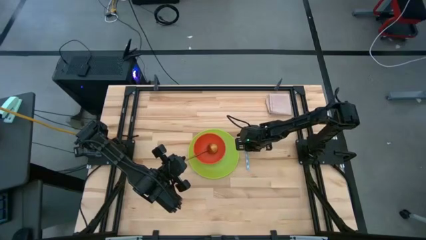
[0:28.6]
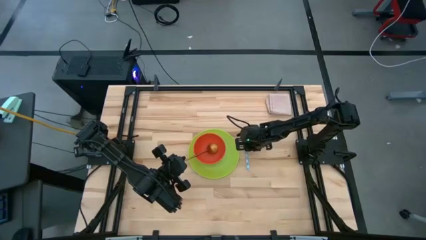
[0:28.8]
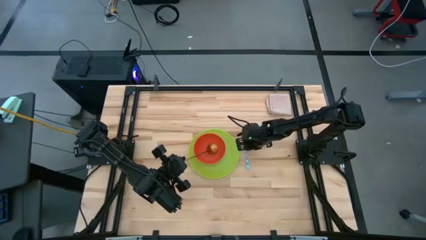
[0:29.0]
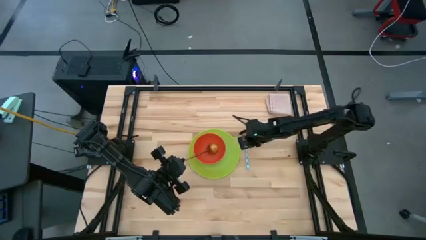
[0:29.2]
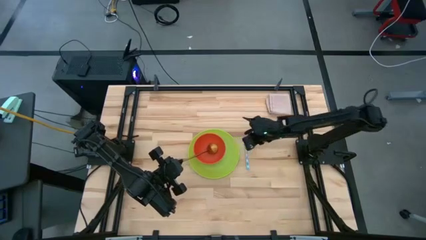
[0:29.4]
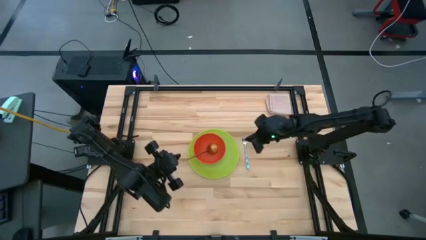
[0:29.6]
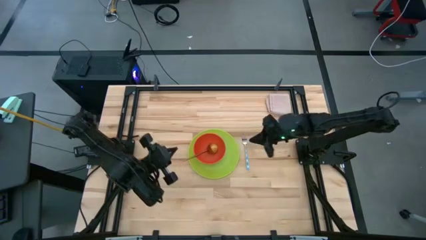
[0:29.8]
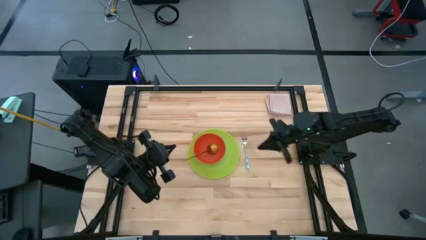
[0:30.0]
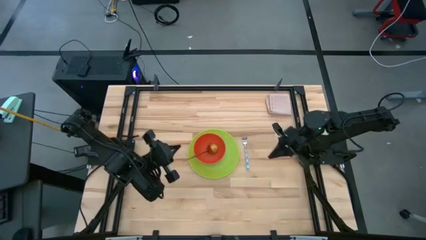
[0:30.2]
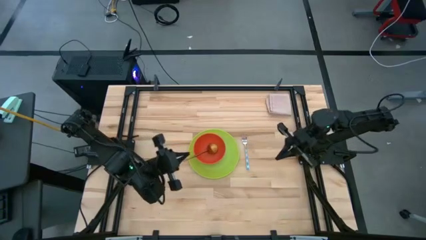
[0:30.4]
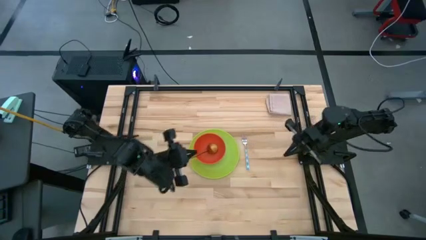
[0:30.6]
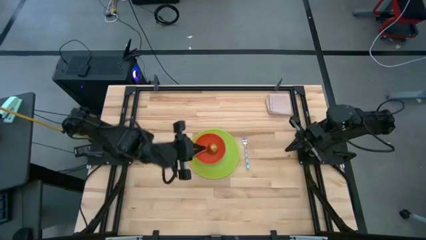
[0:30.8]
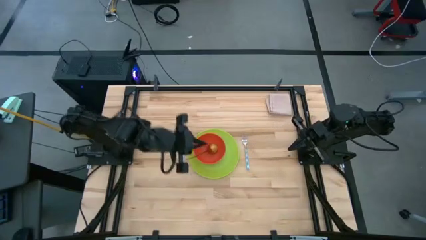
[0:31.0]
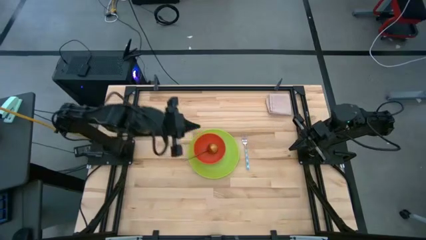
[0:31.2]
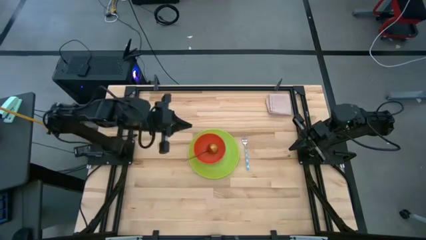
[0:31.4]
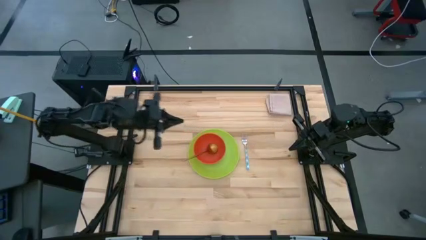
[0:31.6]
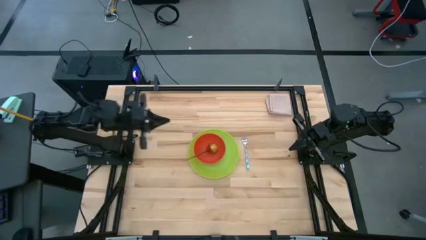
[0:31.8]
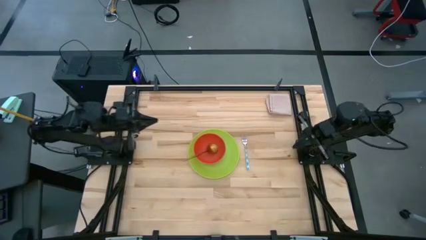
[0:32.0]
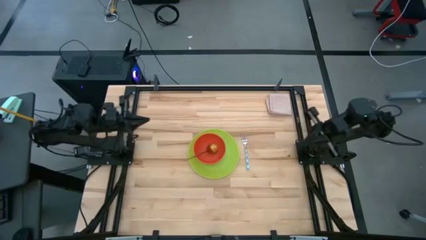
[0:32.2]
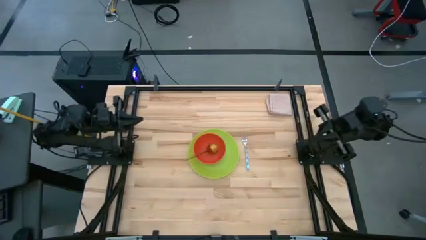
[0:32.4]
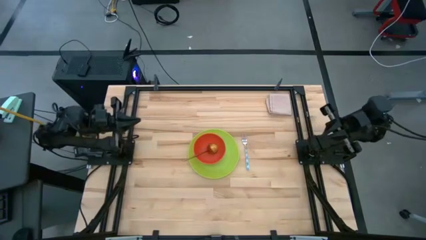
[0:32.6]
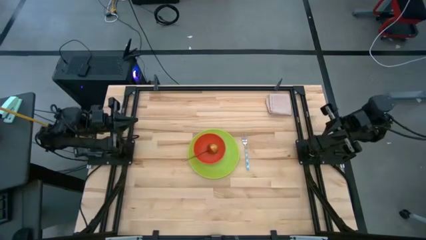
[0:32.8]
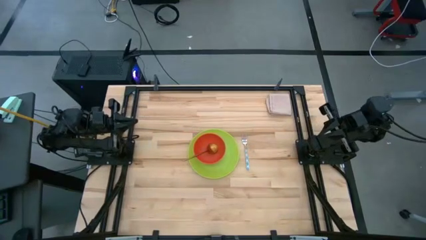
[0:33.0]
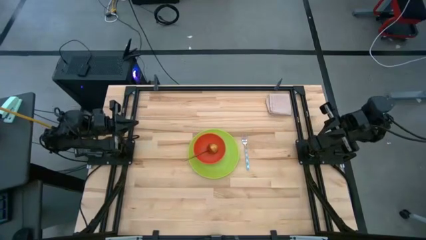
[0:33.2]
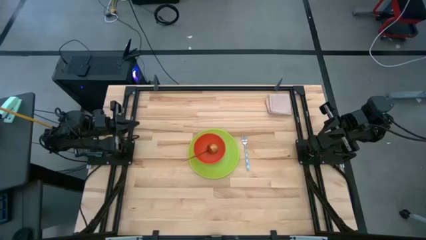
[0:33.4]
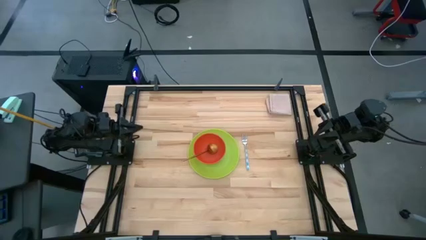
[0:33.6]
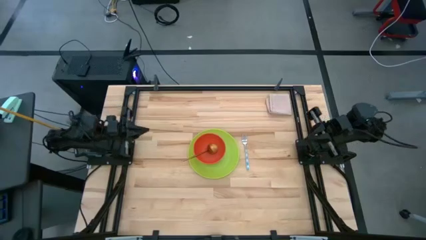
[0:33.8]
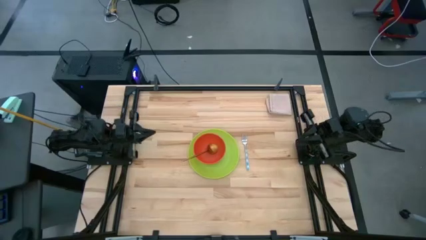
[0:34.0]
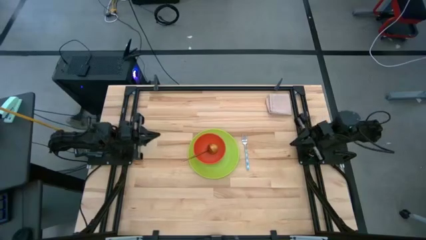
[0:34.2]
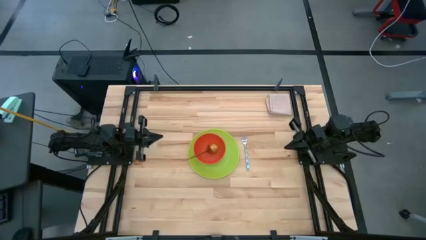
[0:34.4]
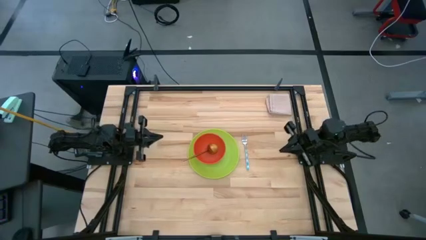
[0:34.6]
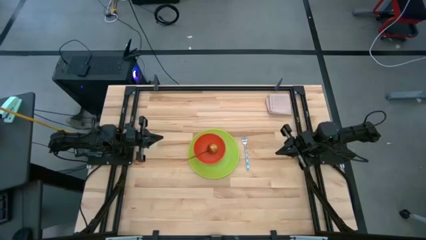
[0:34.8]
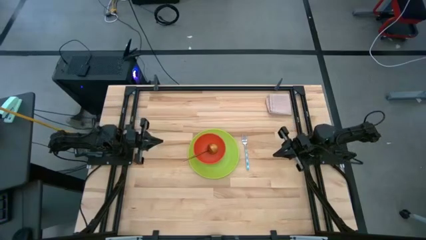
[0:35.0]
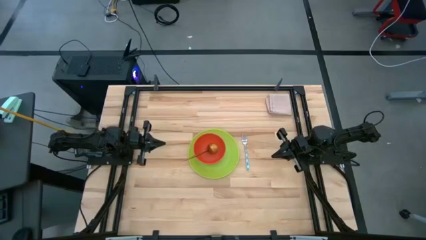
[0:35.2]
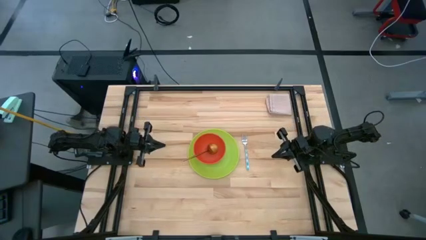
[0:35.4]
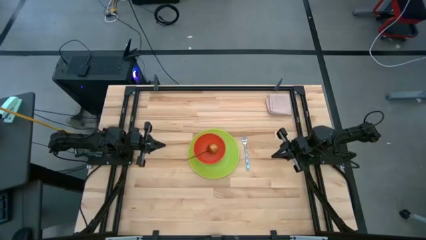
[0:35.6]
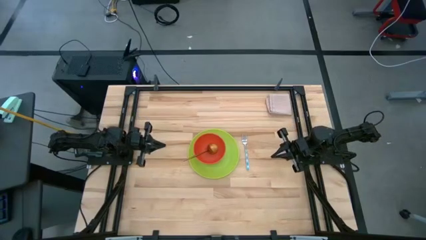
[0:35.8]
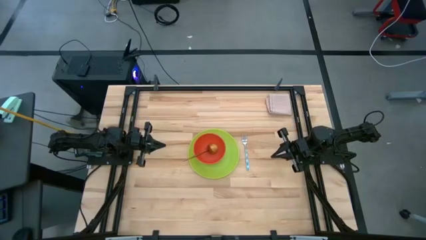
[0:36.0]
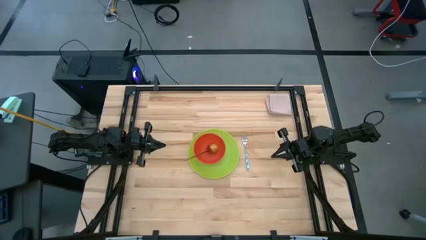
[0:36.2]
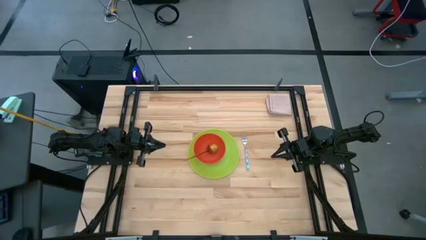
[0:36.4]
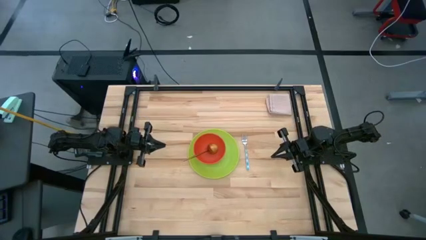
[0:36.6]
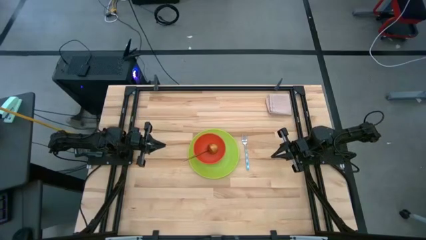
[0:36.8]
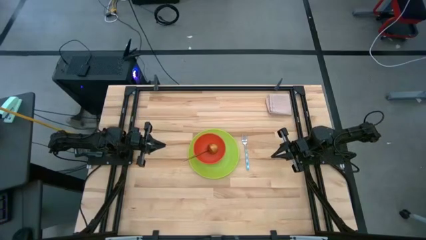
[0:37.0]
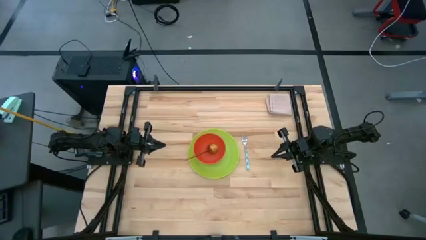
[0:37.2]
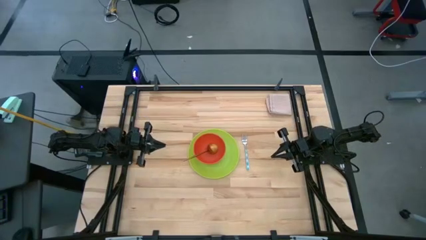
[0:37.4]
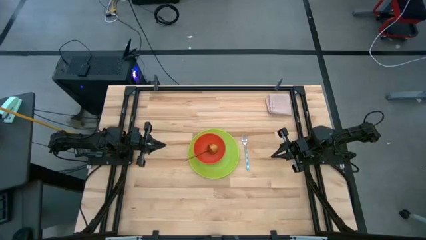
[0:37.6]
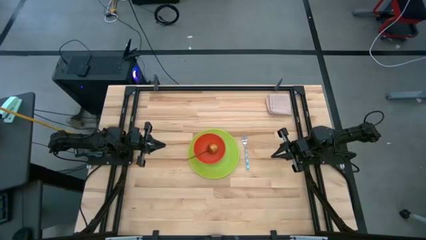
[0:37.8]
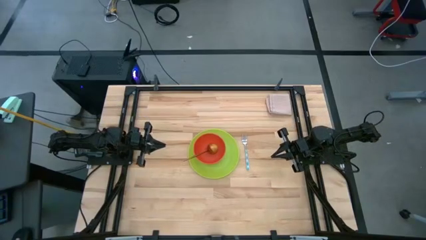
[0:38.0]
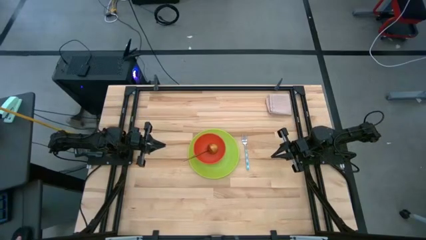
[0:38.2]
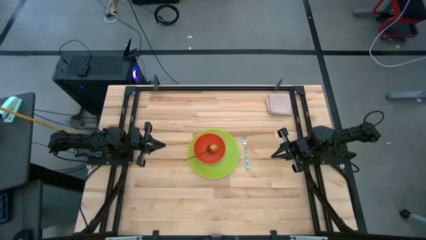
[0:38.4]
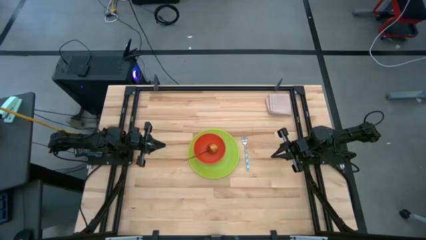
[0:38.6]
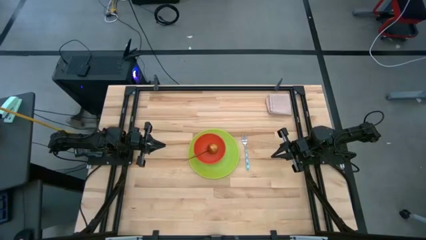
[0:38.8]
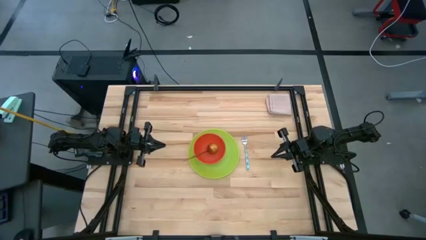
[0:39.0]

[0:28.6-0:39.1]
Task: Pick and place plate/cup/fork/spoon on tray
Return to Home Position

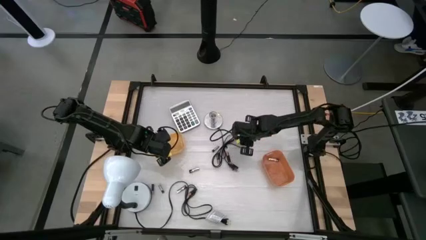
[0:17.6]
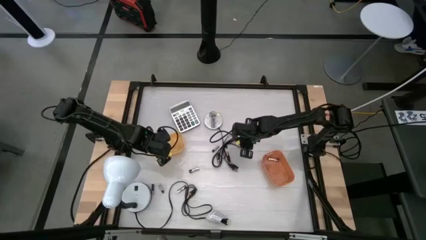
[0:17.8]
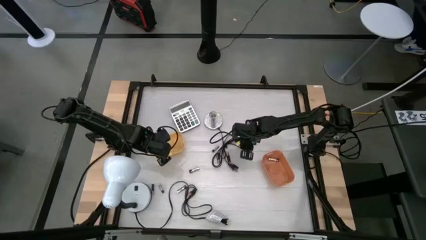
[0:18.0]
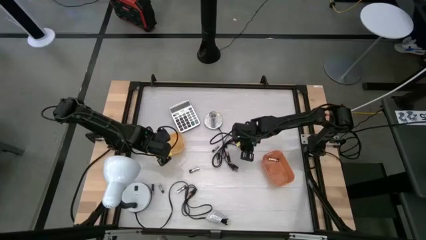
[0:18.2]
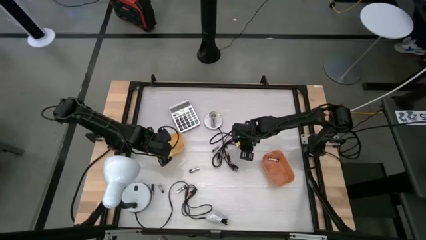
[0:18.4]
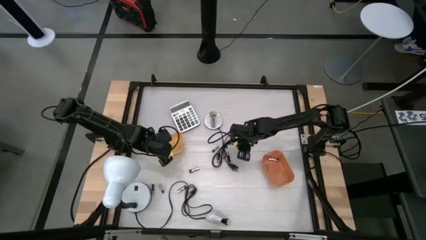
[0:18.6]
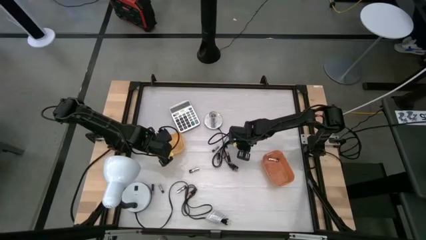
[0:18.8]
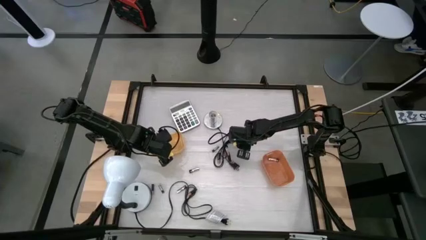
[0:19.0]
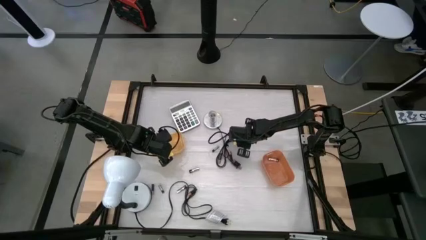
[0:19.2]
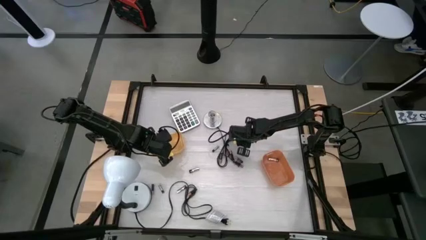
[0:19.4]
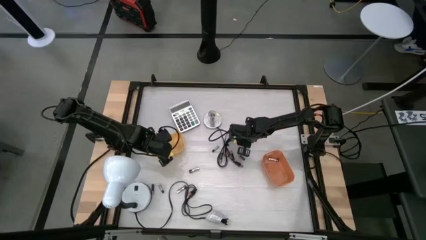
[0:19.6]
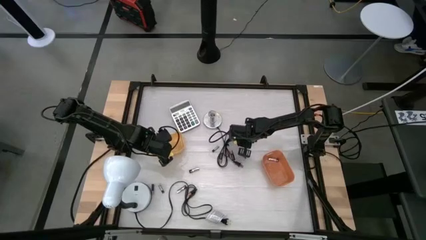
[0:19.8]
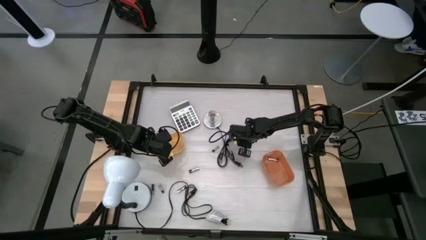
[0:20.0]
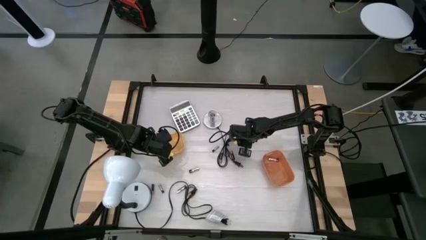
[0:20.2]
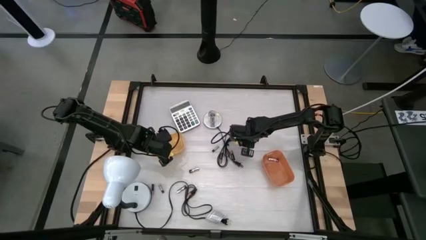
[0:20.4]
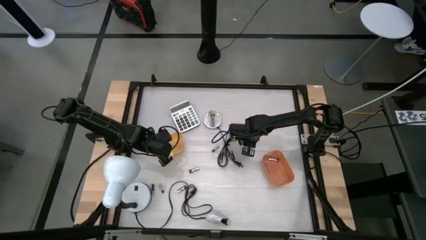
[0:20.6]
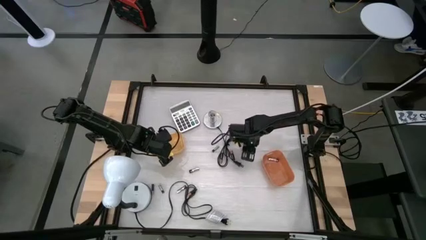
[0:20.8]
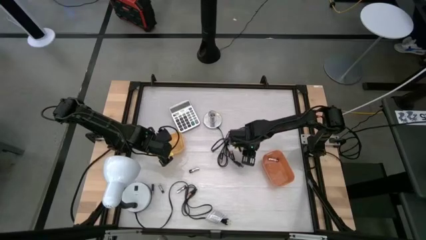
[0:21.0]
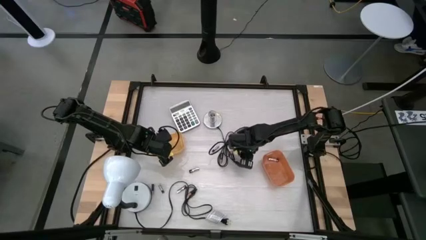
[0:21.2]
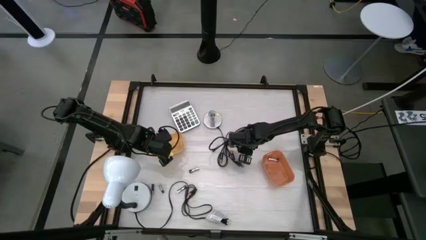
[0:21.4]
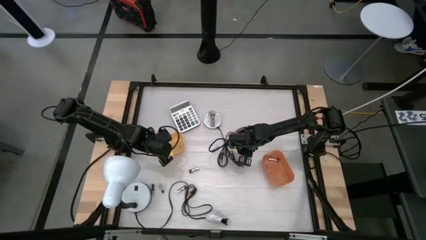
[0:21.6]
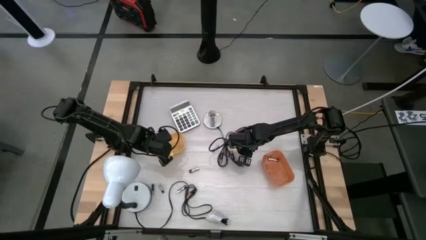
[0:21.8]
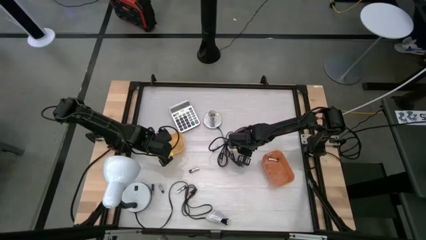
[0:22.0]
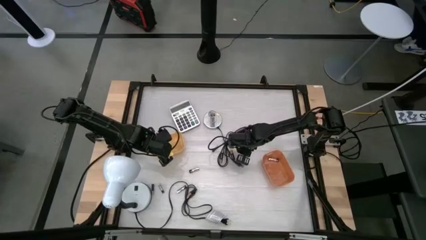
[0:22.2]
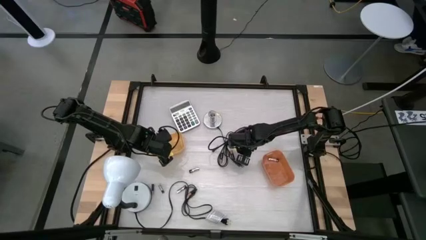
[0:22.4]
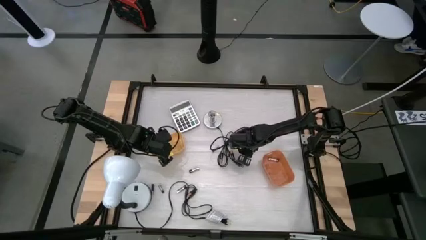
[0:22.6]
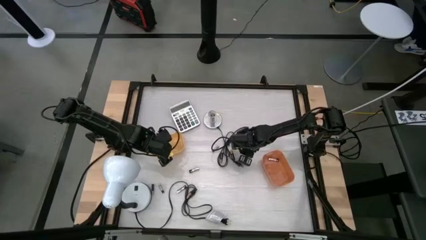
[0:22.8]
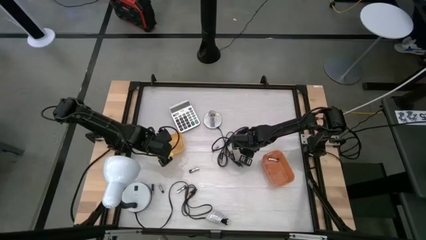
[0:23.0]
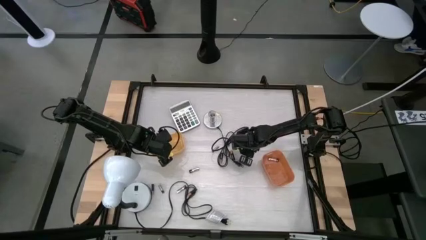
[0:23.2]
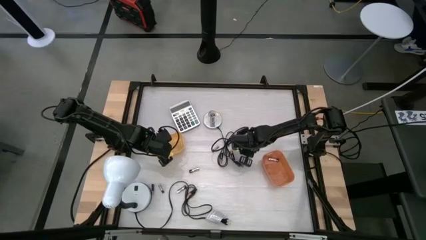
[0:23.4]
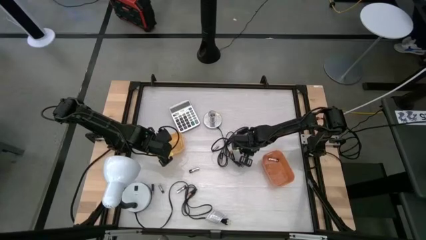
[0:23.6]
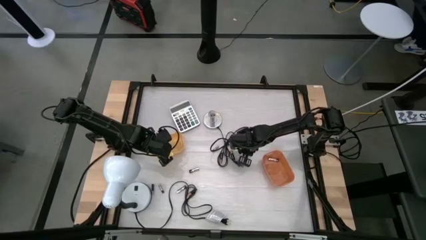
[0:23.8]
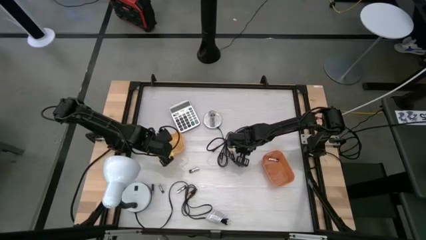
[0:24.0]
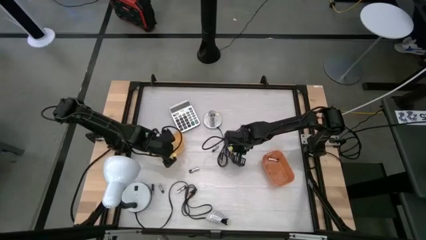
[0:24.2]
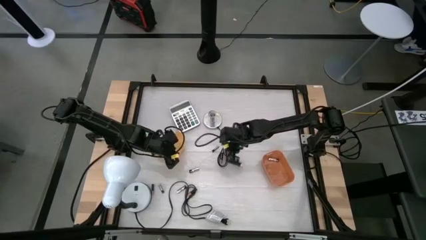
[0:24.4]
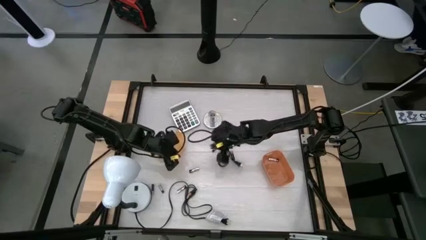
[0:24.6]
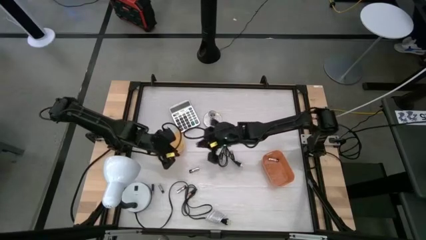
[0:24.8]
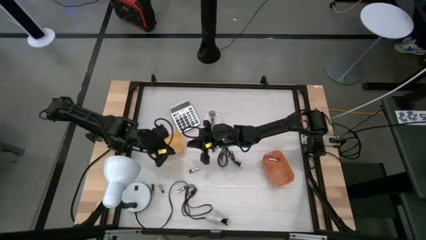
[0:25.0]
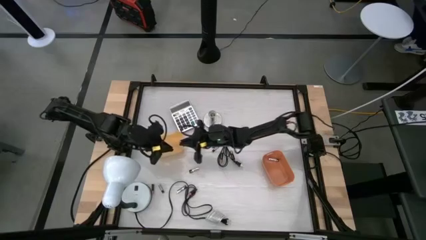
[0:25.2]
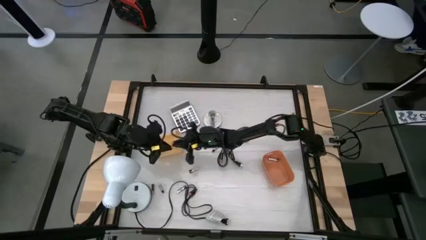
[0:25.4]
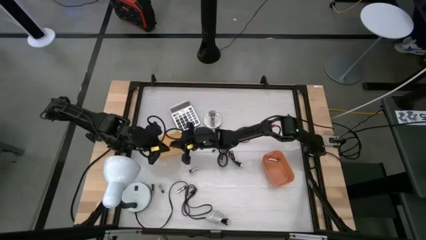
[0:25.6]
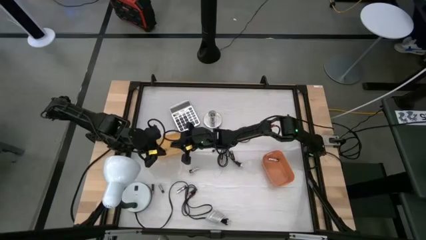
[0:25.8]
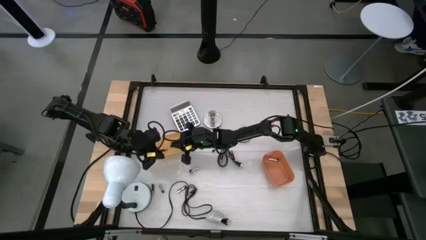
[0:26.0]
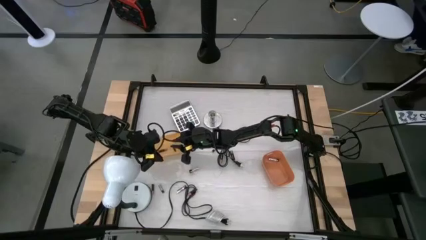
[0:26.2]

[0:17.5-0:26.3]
Task: Sort batteries
Put the black battery into the yellow bin
